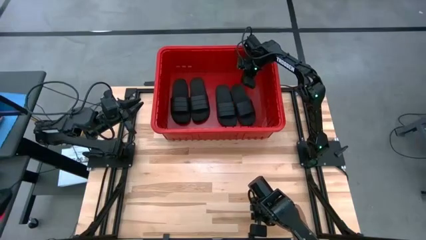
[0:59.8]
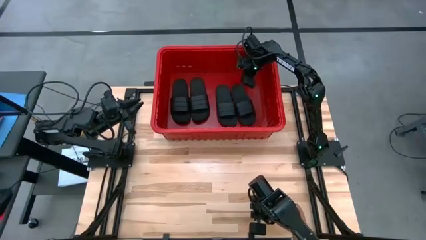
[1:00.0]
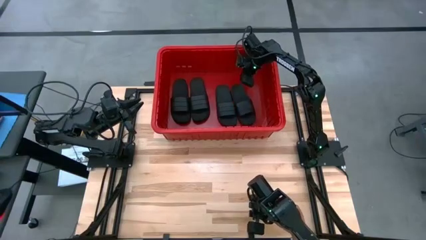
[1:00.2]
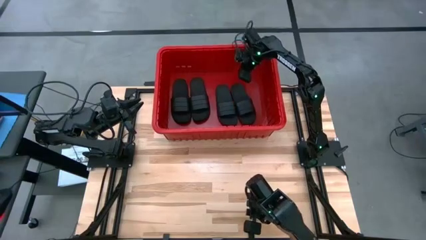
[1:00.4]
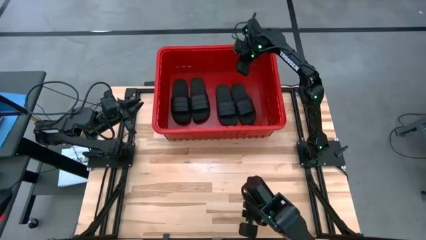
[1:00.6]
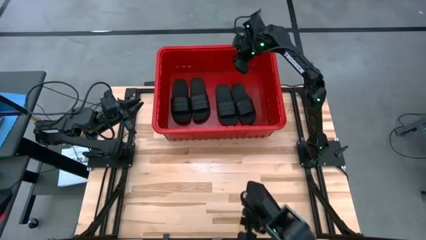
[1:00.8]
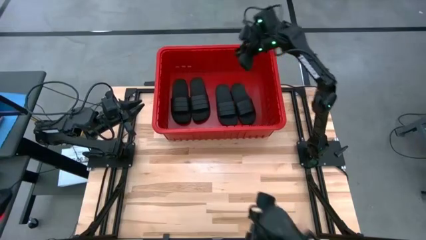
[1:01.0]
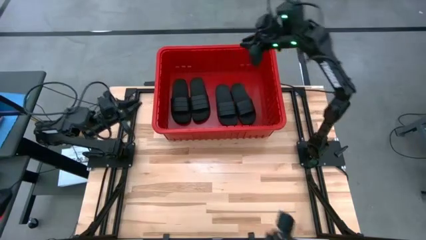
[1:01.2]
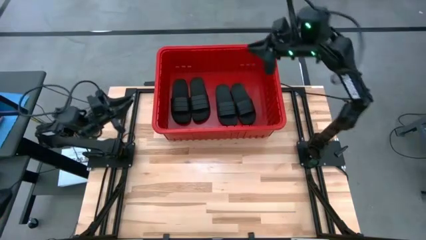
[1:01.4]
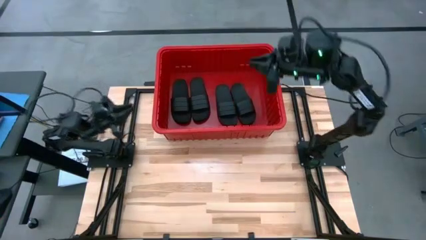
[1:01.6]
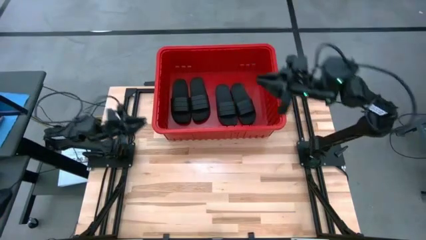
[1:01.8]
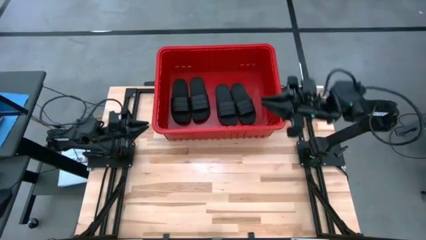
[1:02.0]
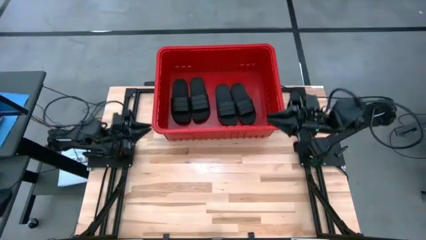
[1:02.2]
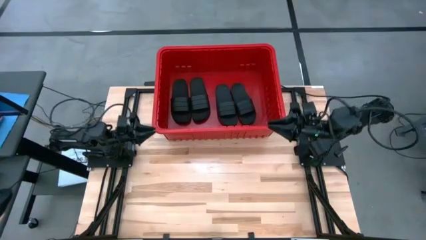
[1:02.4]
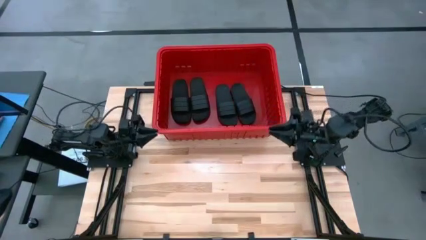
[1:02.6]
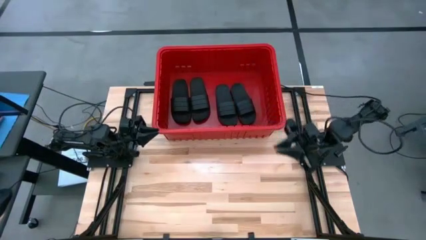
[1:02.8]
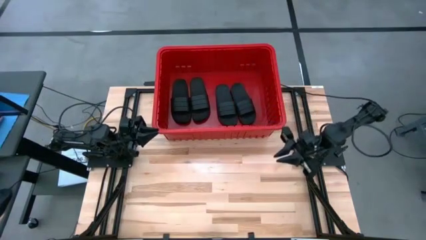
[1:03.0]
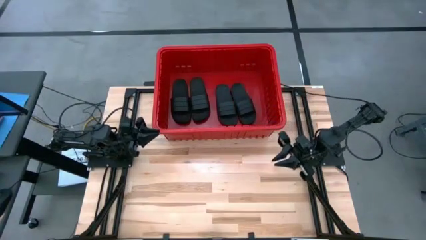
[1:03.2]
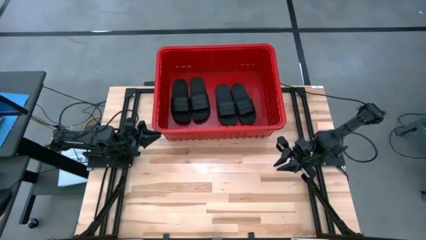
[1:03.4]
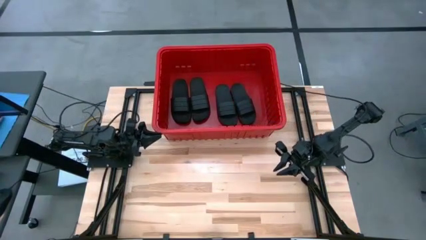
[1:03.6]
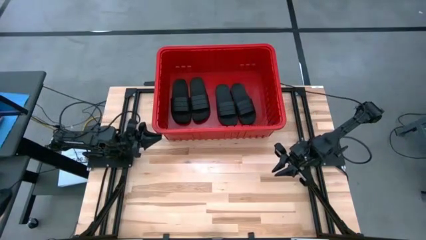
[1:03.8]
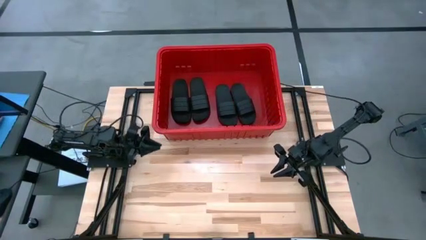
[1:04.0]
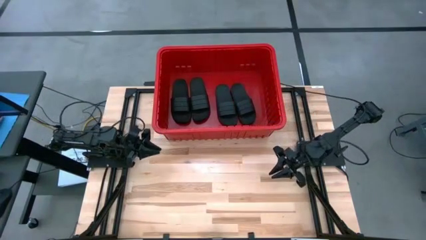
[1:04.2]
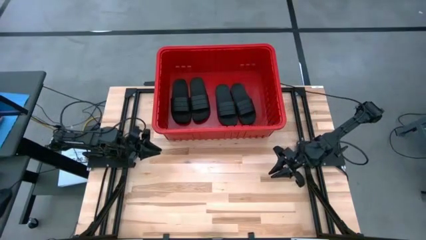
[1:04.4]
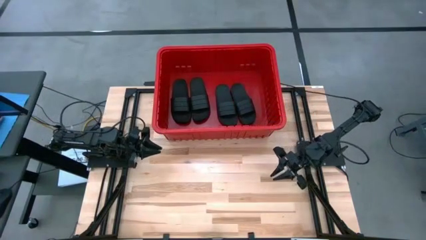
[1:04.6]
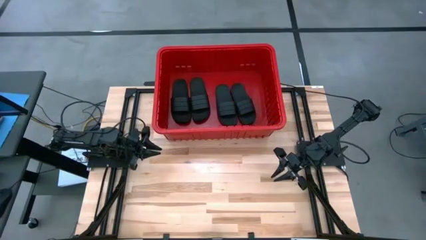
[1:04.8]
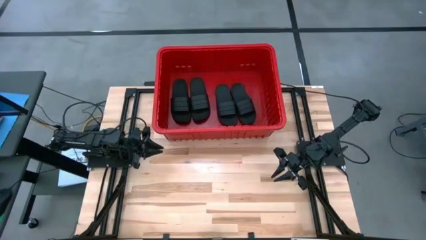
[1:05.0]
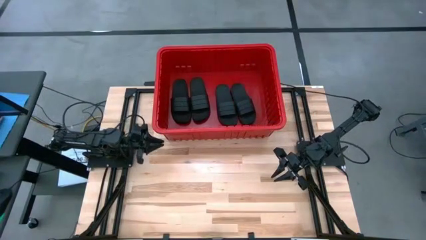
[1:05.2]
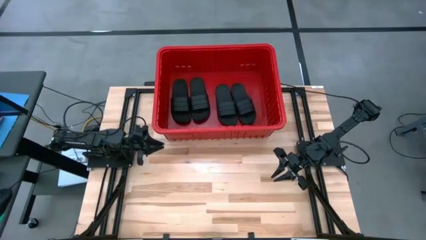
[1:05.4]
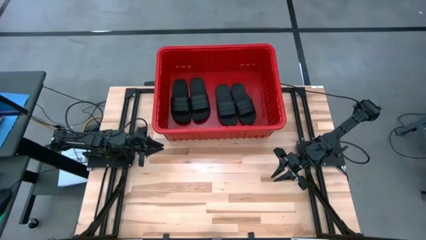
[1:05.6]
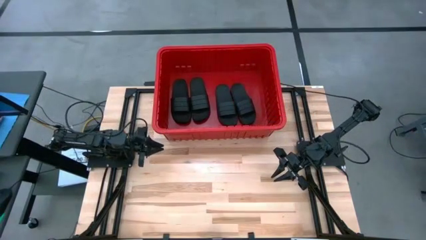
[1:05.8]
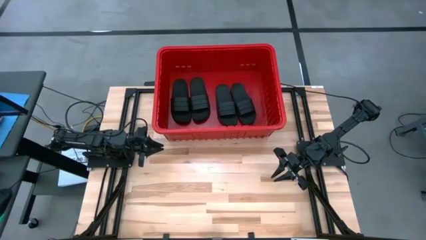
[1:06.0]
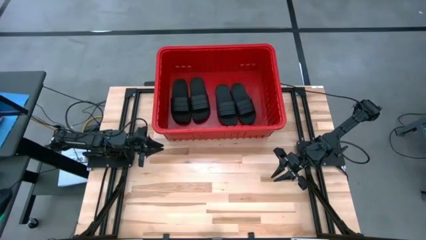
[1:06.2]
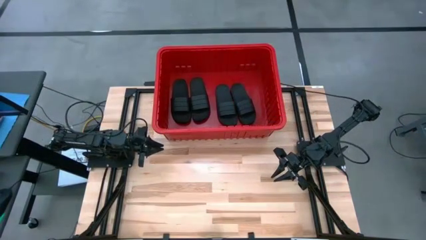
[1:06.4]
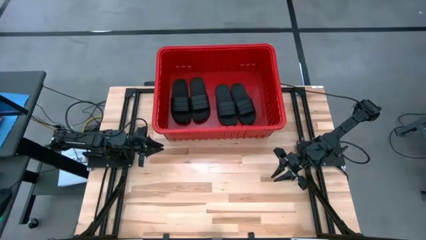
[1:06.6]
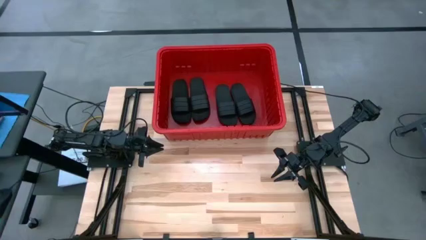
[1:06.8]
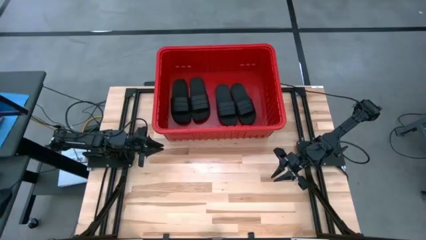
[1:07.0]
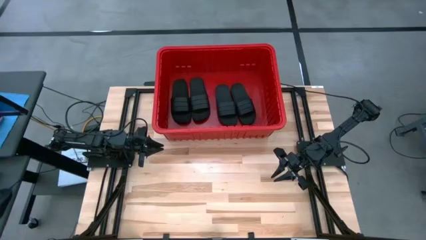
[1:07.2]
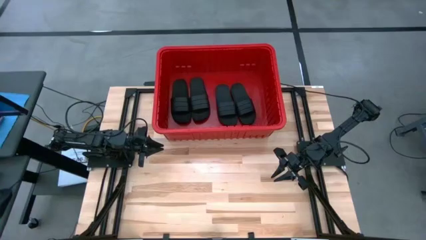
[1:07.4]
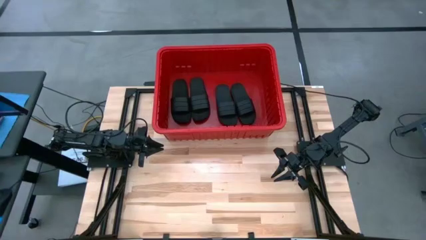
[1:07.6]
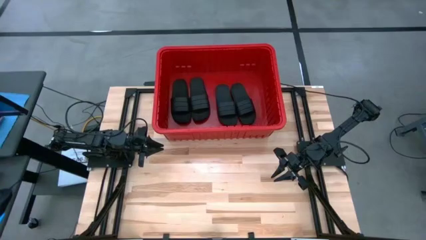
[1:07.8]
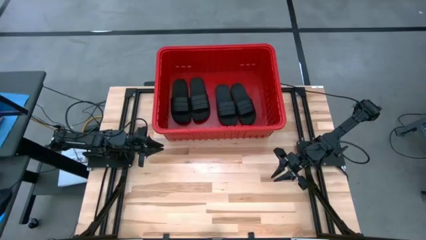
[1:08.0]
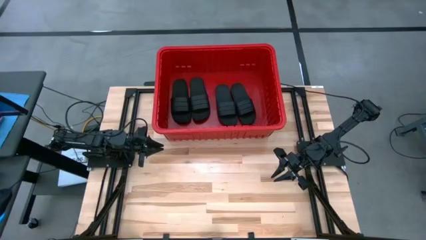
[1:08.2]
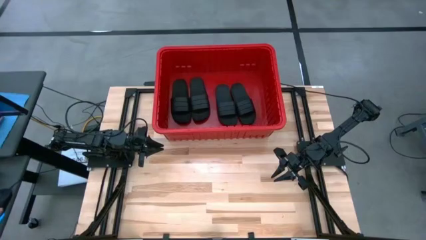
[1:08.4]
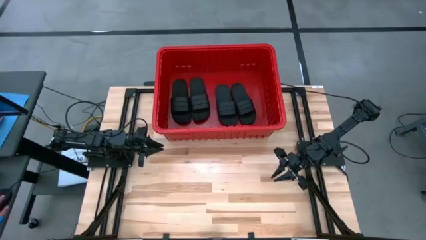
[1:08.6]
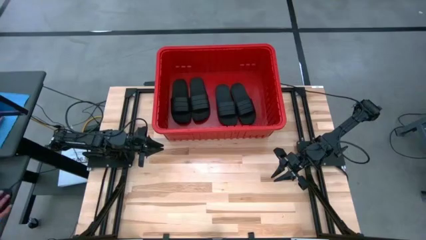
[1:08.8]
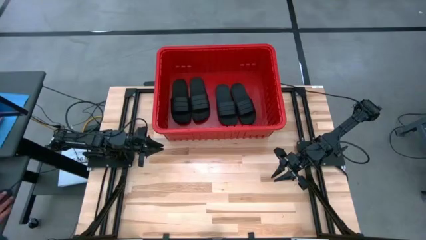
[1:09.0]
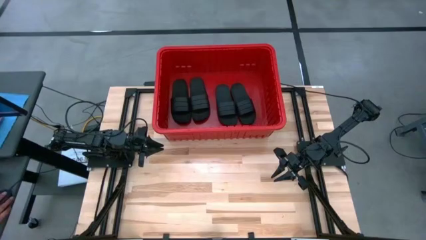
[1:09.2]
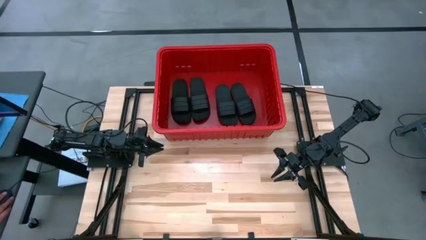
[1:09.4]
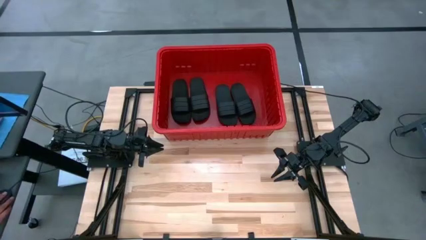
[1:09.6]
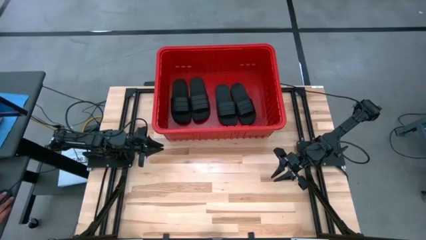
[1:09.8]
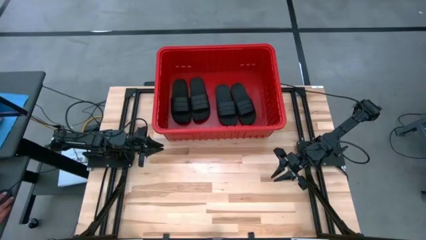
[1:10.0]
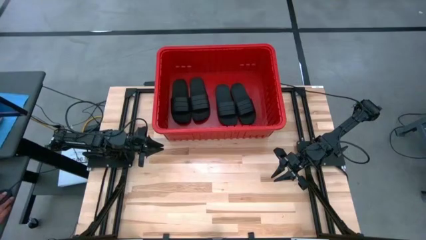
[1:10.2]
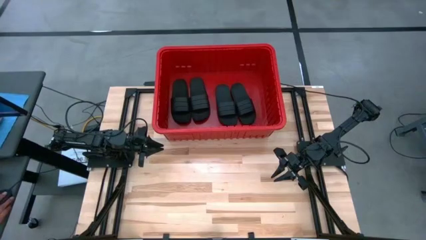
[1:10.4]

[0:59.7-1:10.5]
Task: Pick and place slides into bin
Return to Home Position

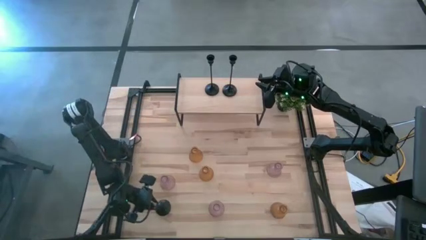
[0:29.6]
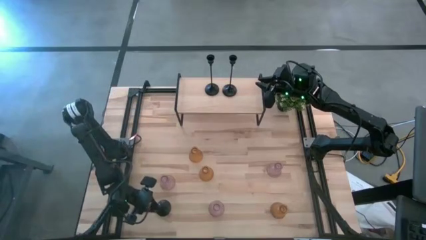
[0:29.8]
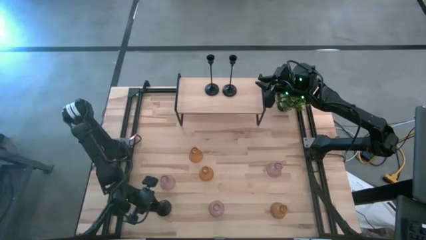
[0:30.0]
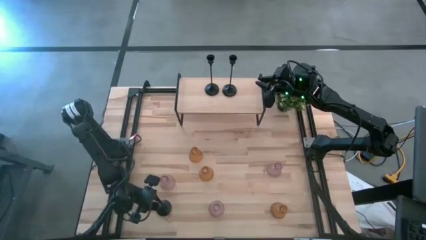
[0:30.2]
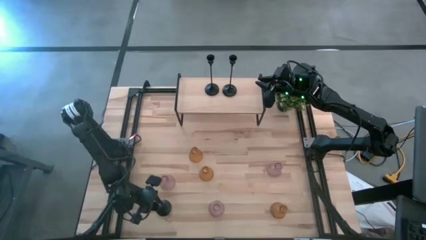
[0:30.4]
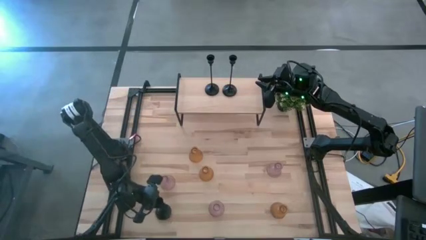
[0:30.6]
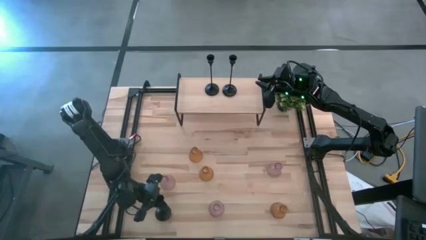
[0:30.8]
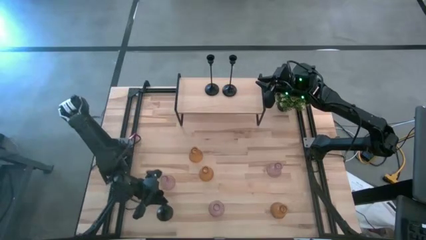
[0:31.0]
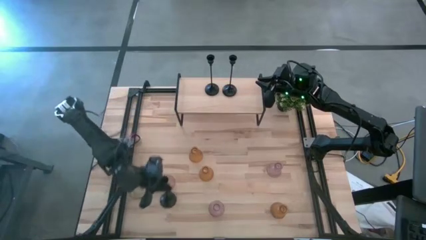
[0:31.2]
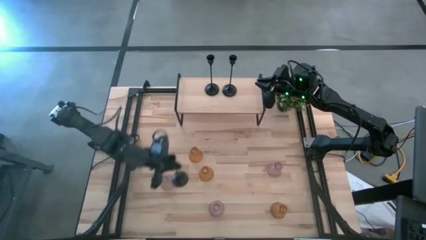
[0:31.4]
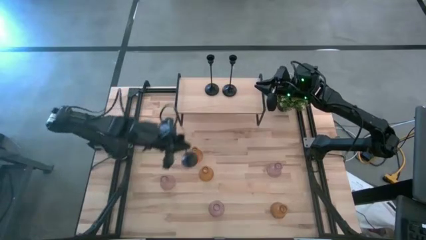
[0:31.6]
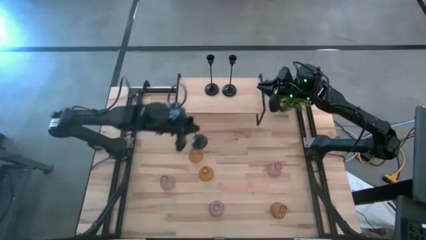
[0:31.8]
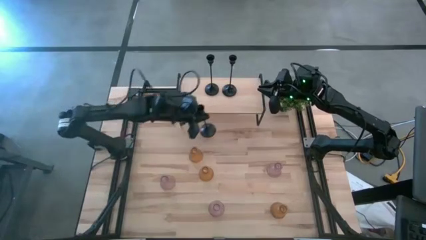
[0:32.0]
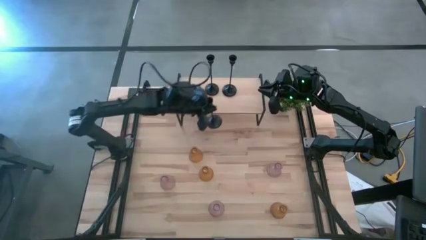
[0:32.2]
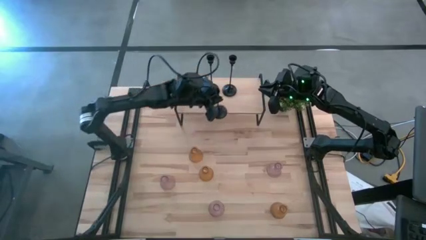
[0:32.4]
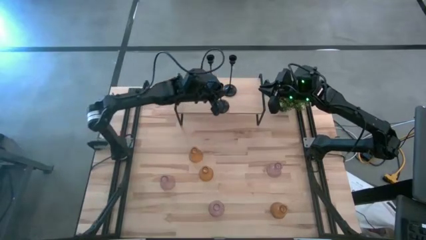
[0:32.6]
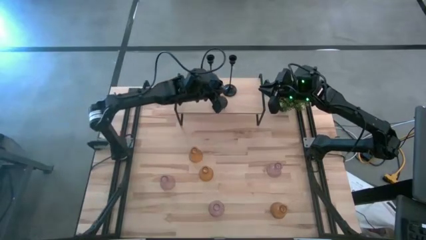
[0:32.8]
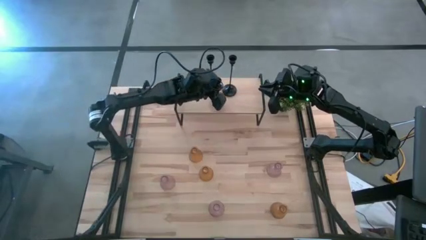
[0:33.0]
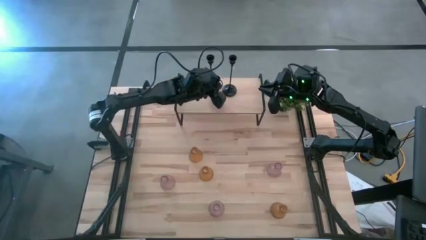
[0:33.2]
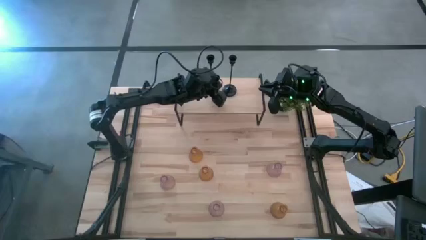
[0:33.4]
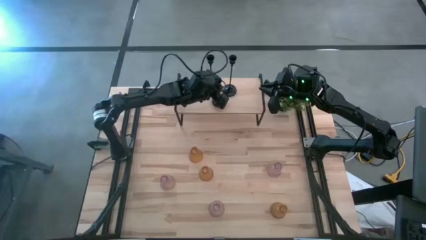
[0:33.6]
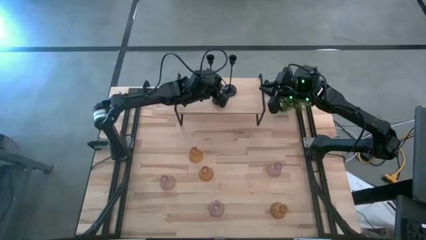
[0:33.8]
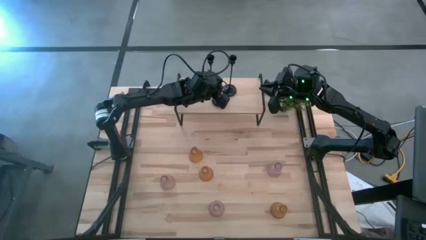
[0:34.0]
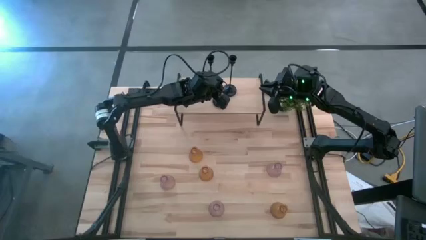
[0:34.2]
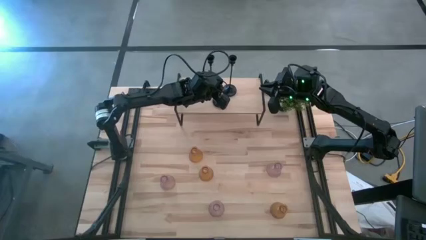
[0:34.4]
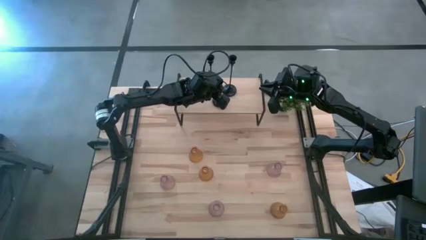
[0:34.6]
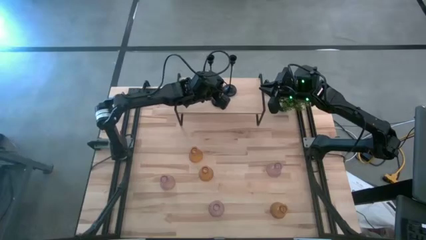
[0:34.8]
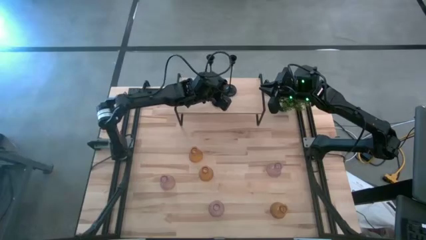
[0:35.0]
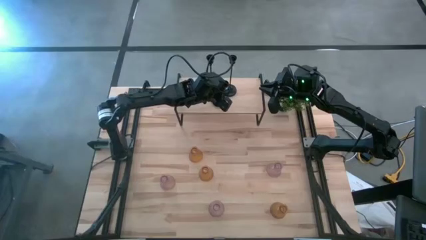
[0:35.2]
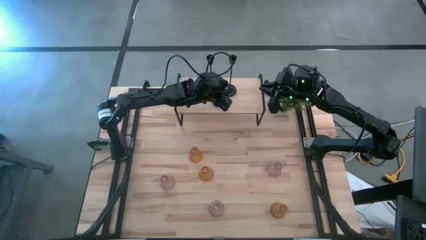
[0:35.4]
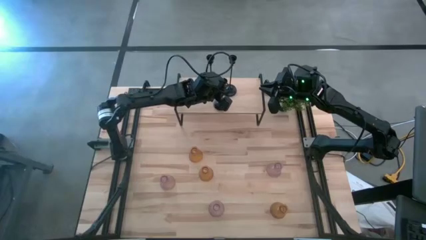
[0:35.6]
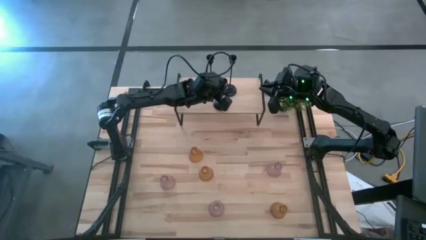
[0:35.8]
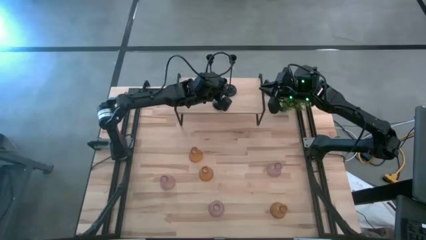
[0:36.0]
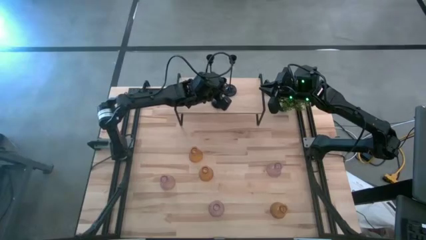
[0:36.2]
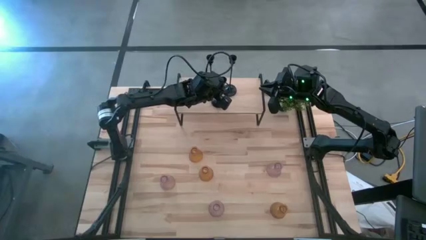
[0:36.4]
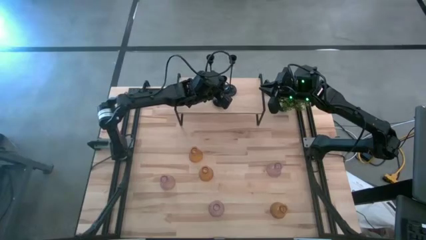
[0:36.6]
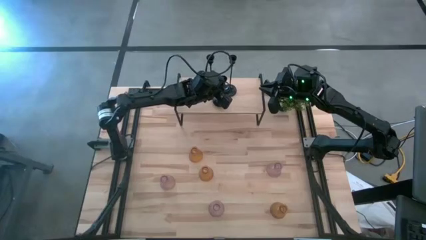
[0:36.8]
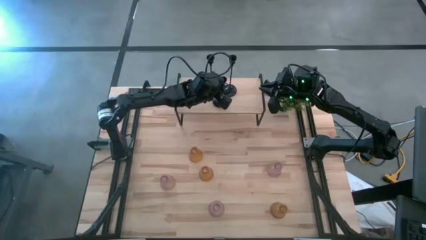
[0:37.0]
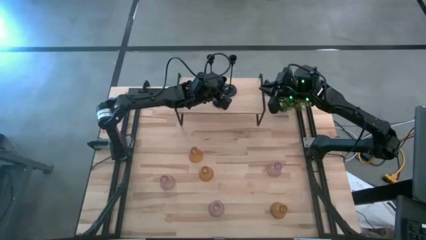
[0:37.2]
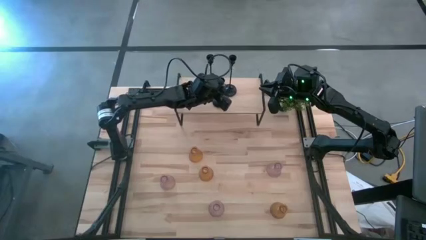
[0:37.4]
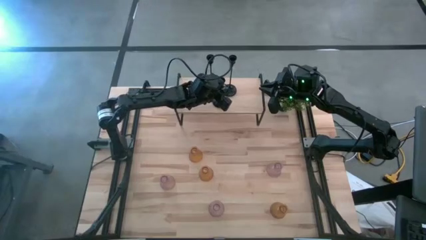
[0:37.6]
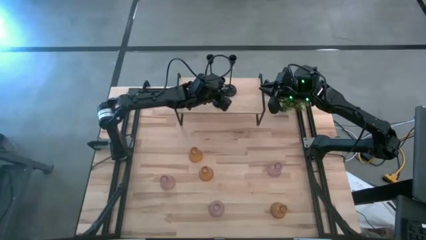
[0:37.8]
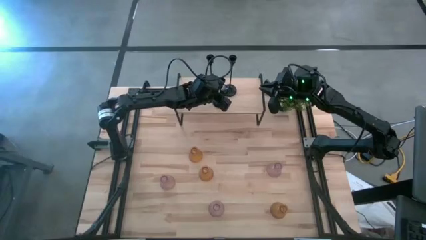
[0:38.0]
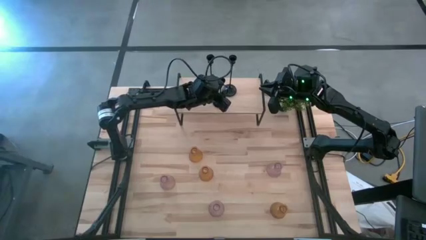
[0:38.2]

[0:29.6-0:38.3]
Task: Pick & Place candle stick holders
Put the black candle holder on the shelf
